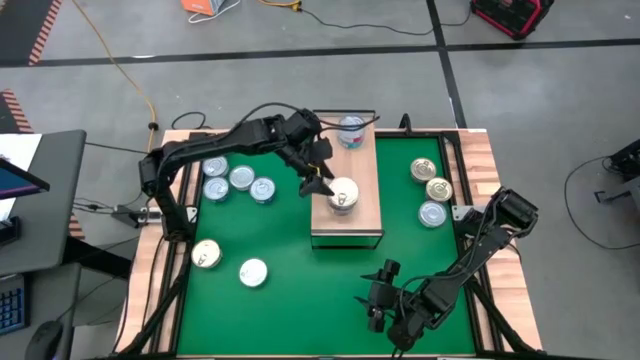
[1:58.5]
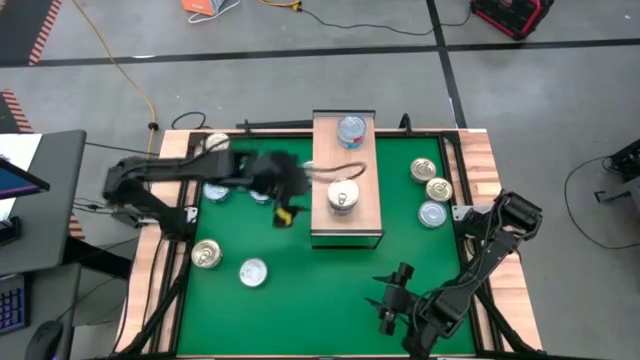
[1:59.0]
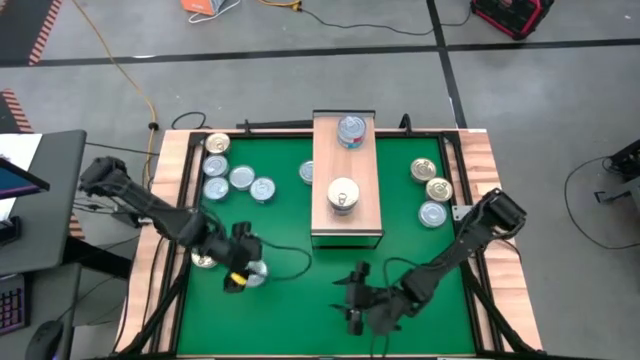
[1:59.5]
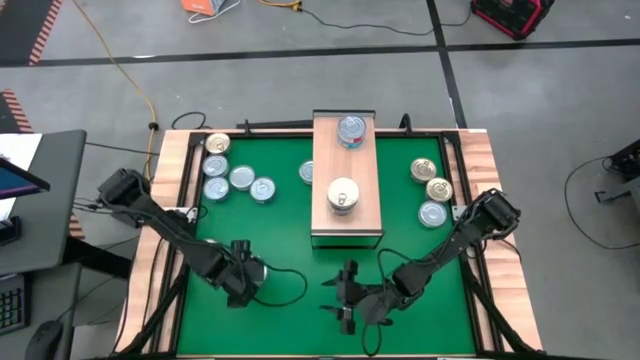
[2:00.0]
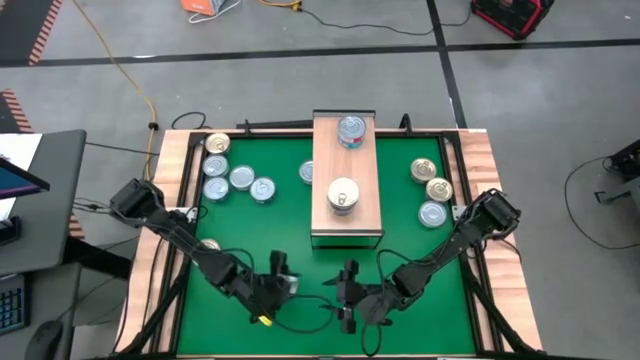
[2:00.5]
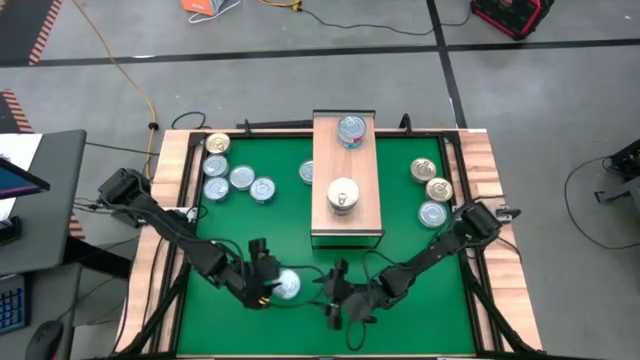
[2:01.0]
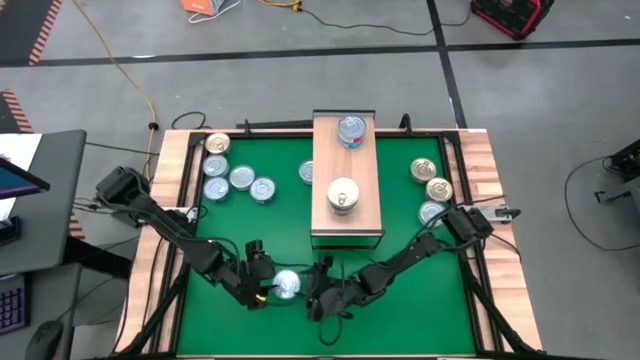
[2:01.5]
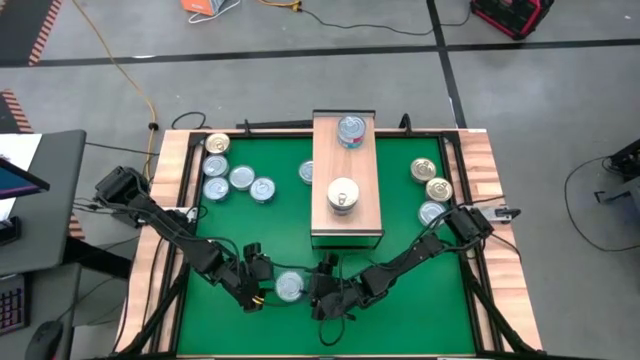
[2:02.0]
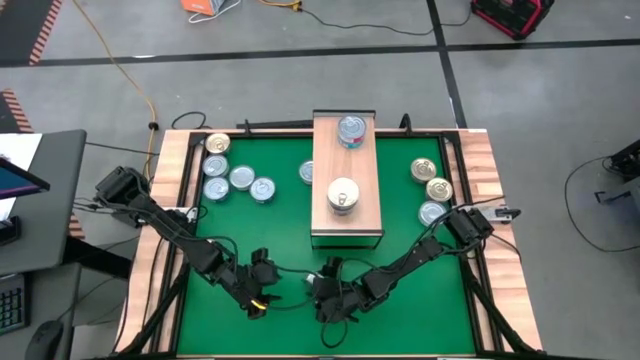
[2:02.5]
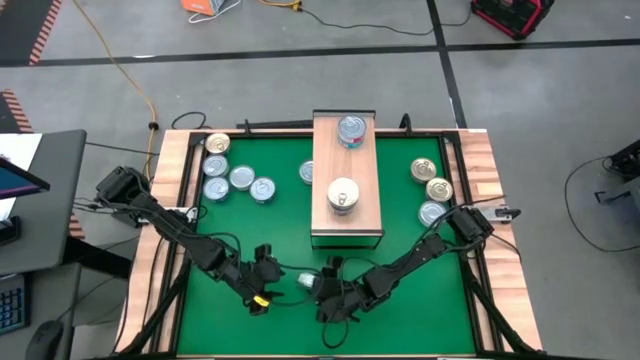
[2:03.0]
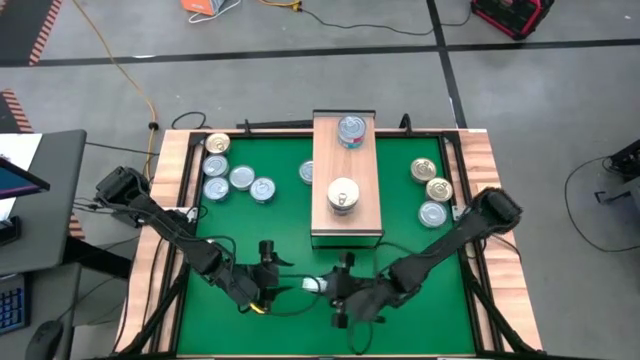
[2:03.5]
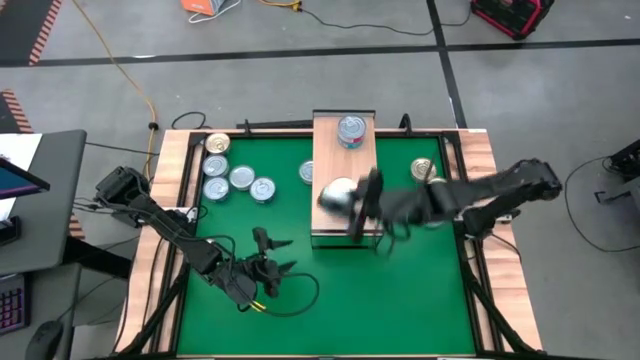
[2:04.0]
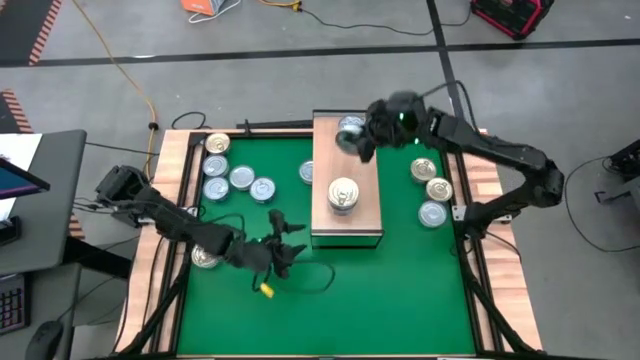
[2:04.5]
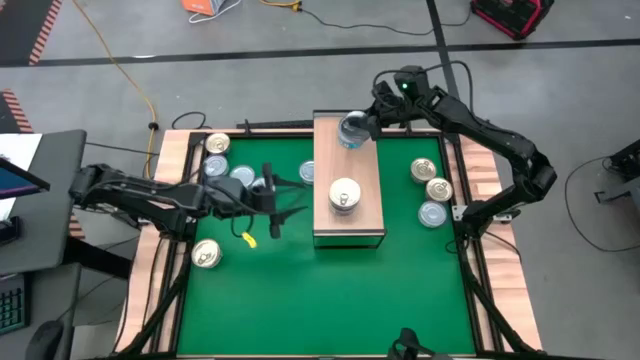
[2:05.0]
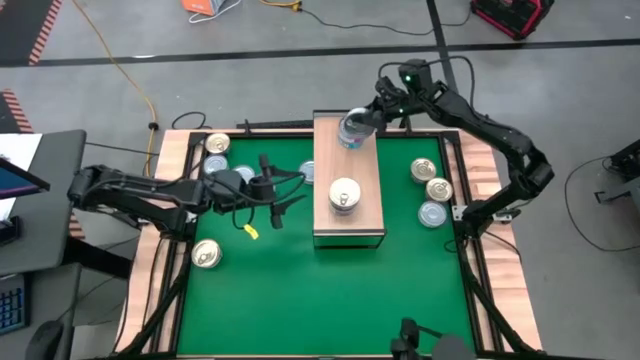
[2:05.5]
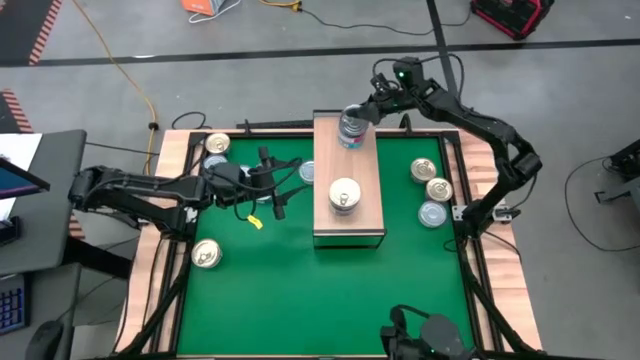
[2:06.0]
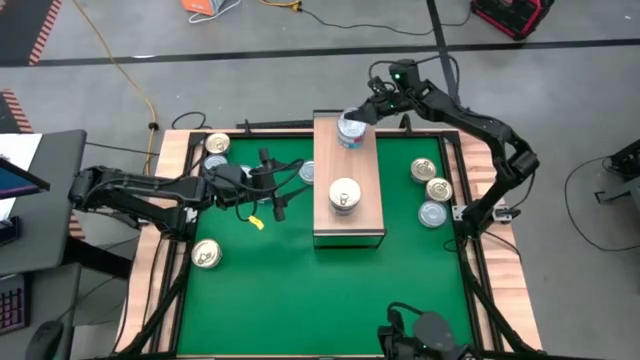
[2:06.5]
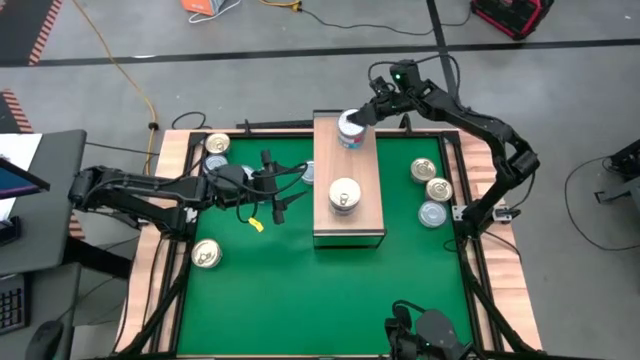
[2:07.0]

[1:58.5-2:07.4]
Task: Stack canned seafood by type on shelf
Stack the green tuna can on top of the red tuna can on the shelf

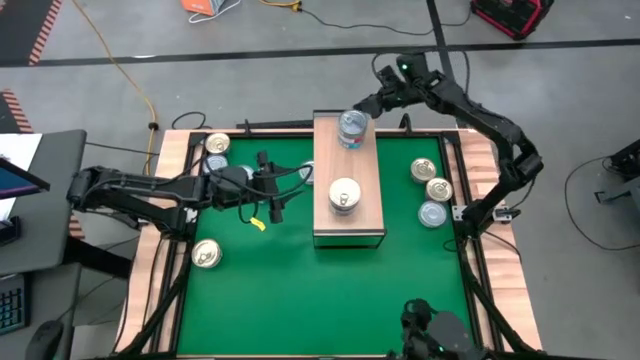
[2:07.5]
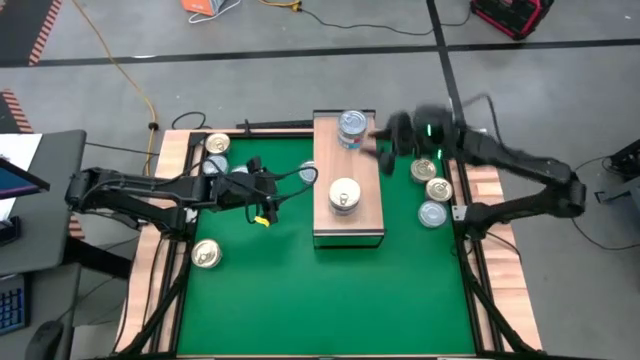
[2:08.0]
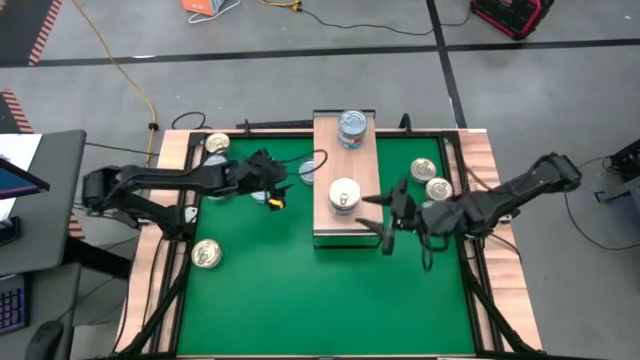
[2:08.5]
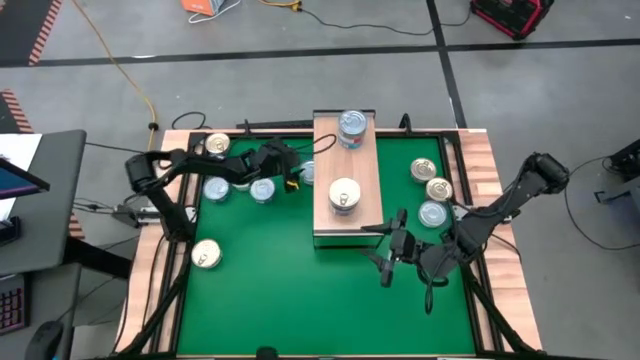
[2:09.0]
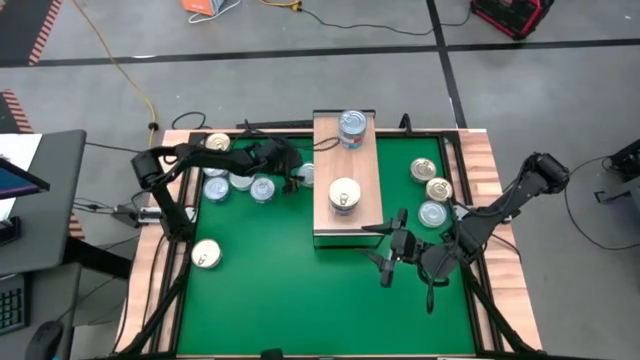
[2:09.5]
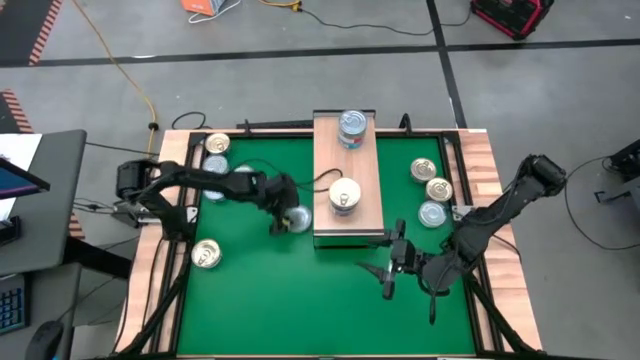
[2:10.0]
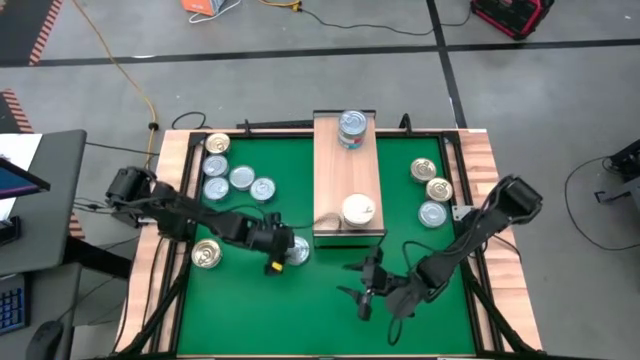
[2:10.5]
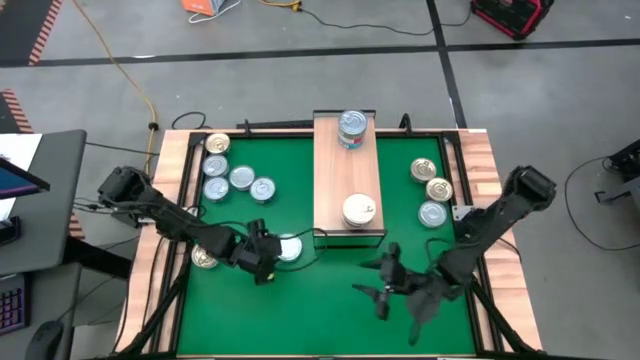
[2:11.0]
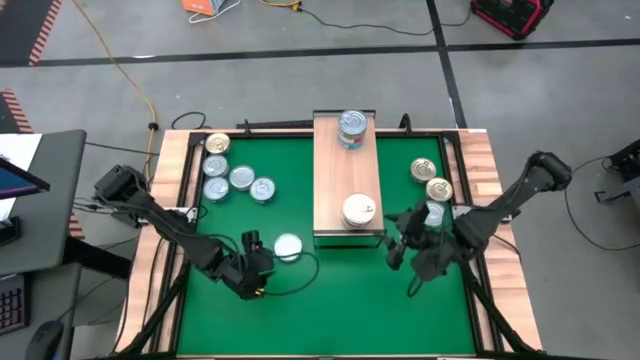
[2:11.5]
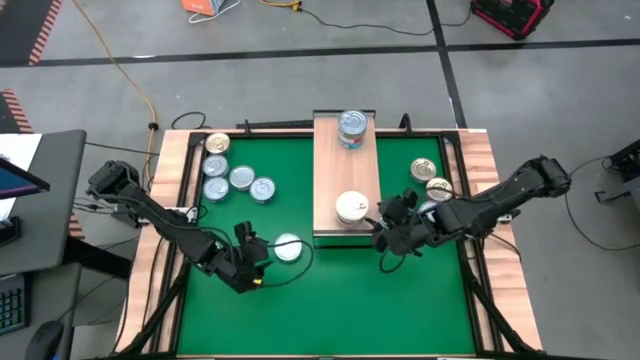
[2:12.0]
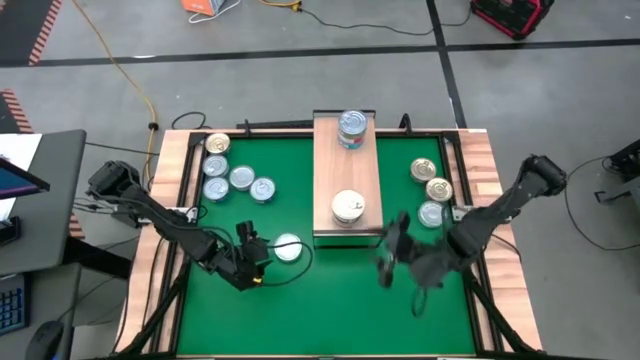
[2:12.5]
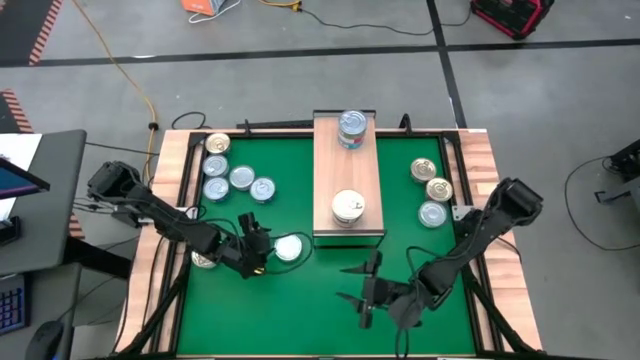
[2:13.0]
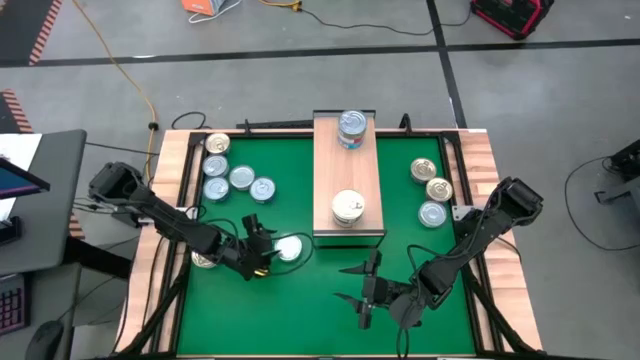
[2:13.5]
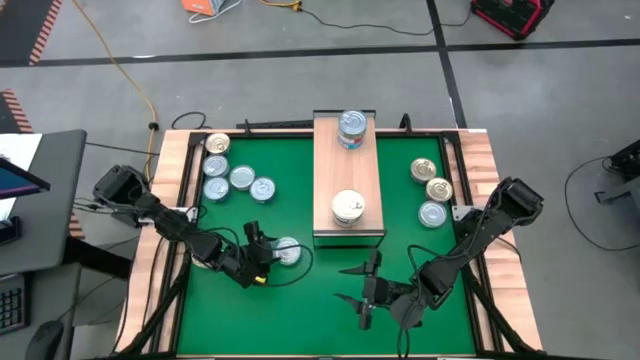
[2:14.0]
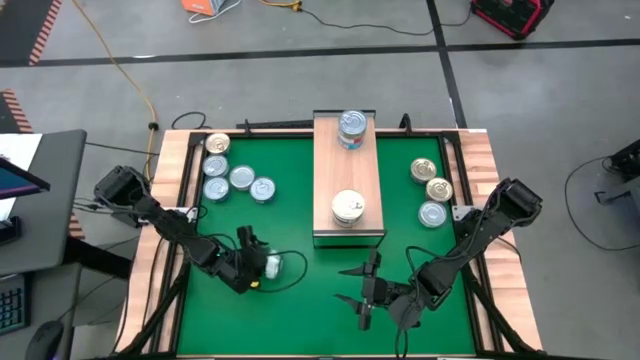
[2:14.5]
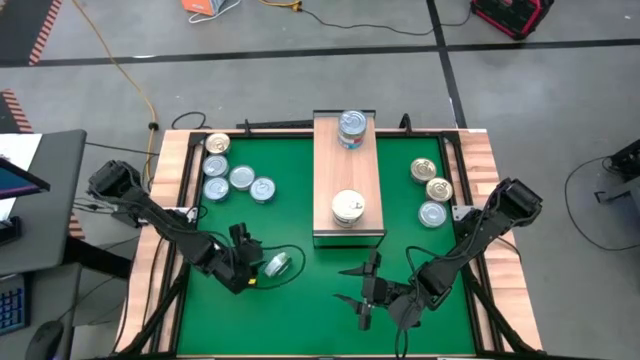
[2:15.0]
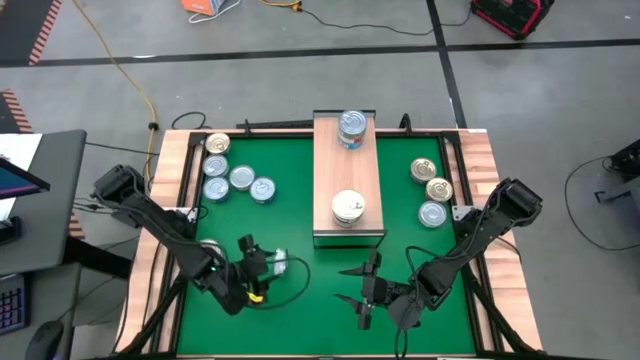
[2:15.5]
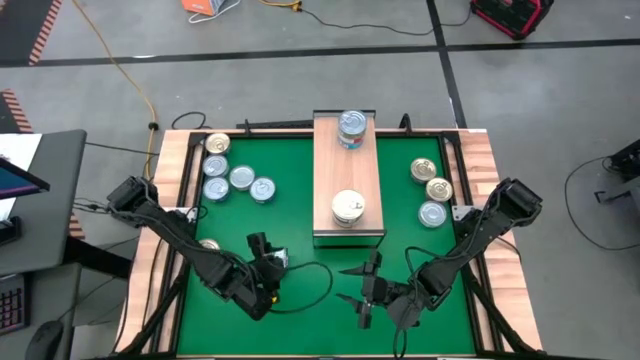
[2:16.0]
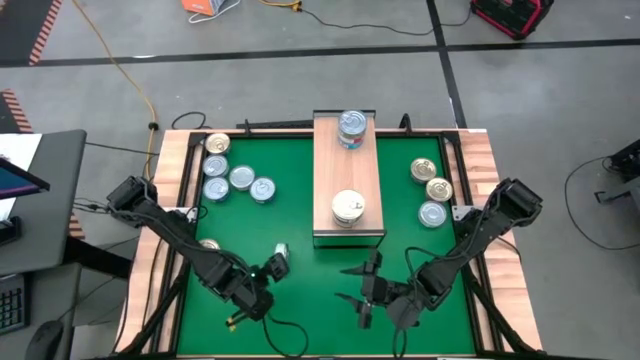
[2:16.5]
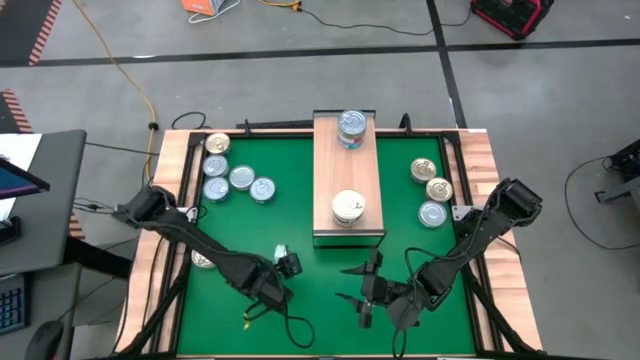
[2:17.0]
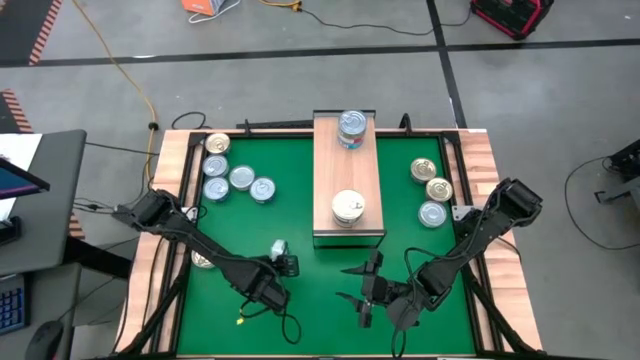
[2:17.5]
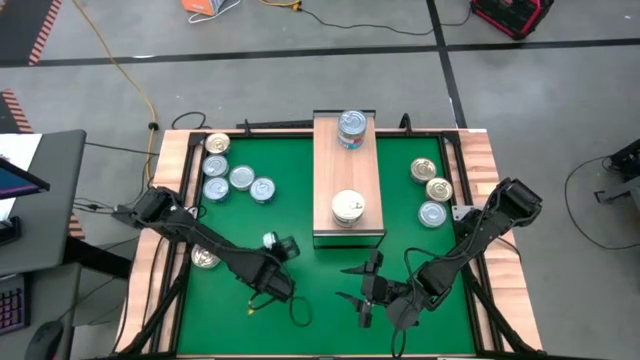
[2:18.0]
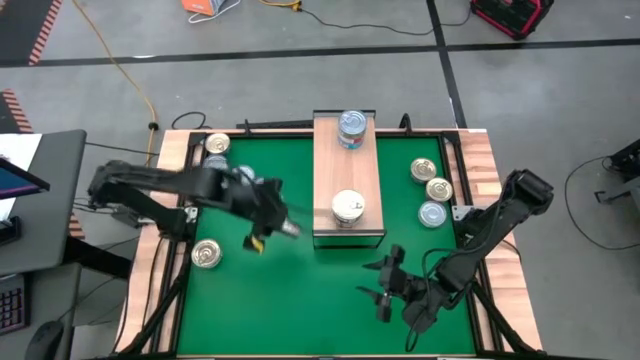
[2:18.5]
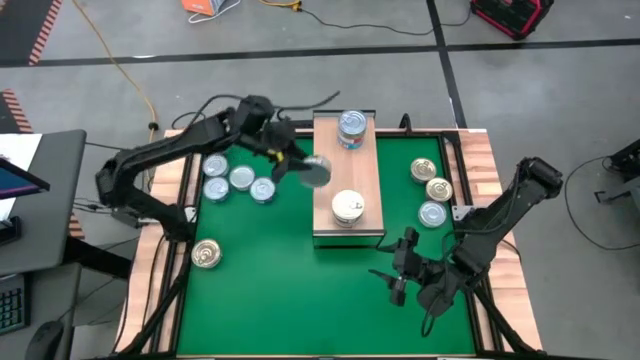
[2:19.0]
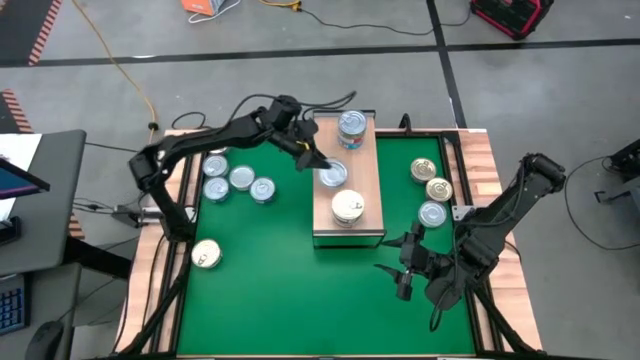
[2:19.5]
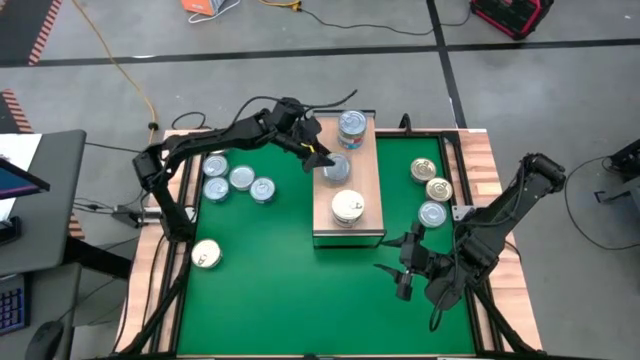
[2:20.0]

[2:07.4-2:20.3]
Put the green tuna can on the shelf
